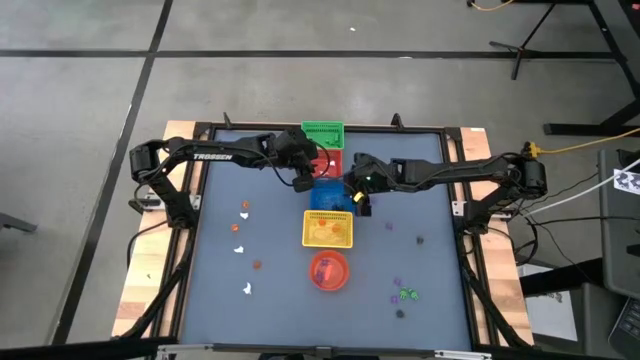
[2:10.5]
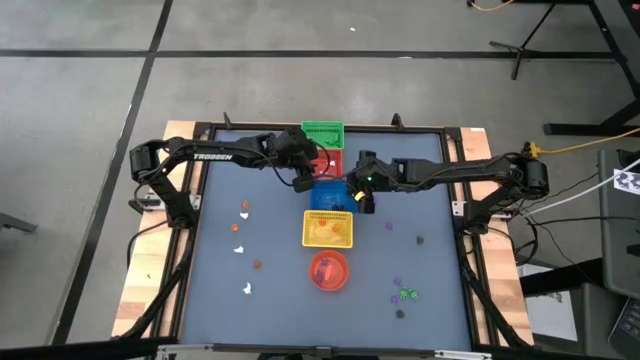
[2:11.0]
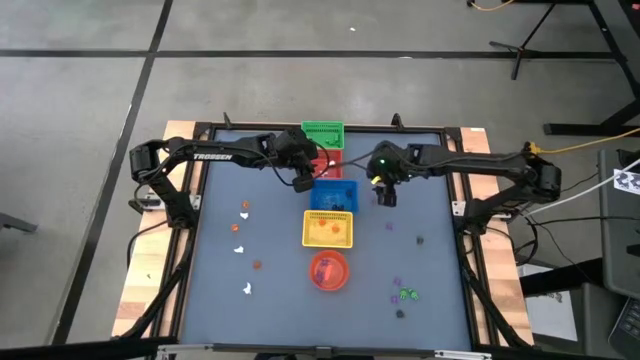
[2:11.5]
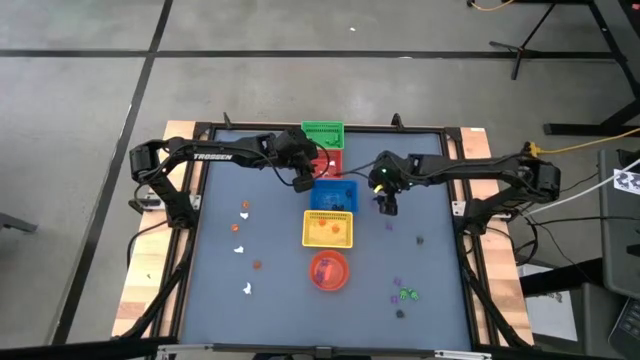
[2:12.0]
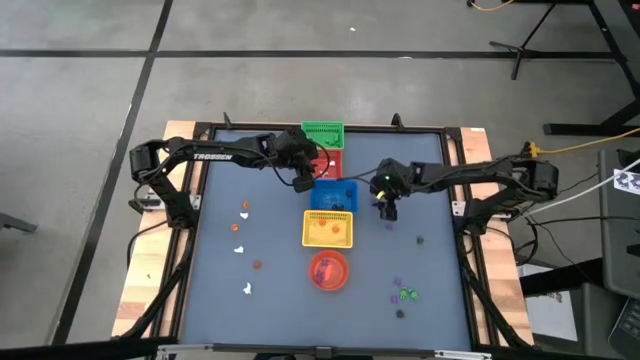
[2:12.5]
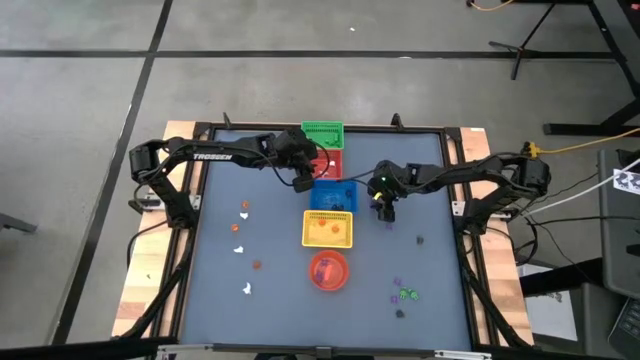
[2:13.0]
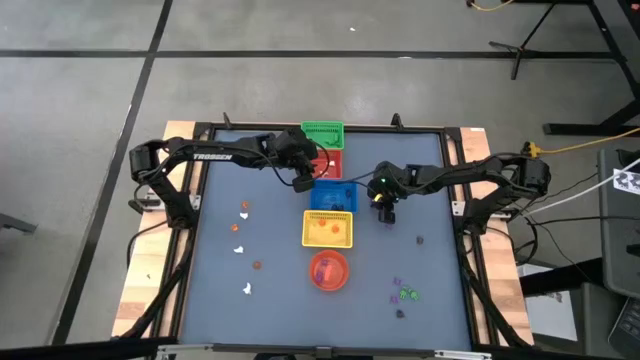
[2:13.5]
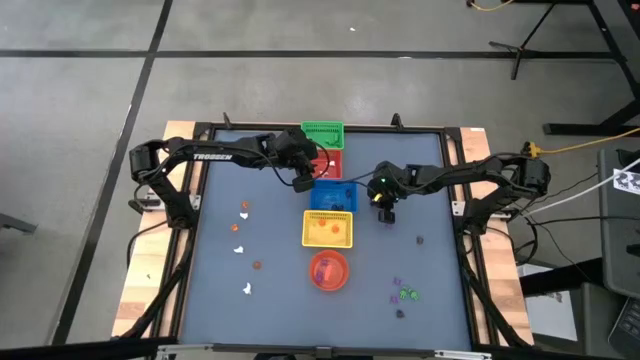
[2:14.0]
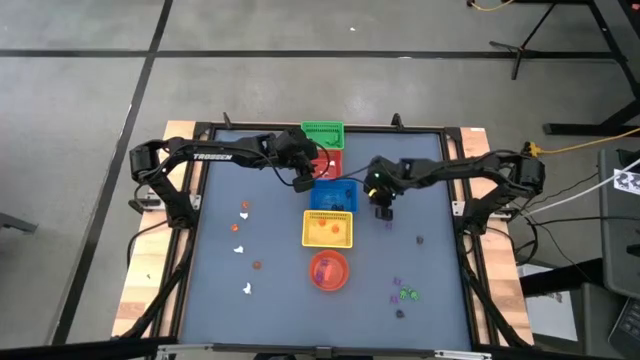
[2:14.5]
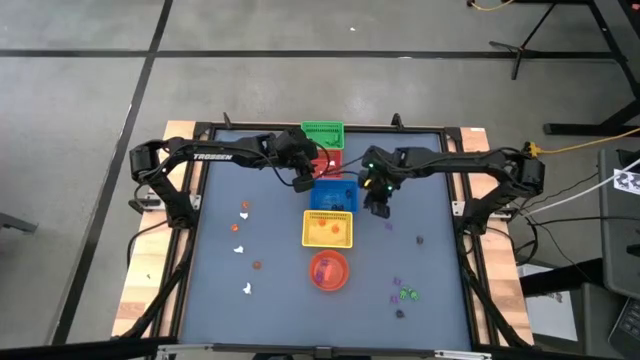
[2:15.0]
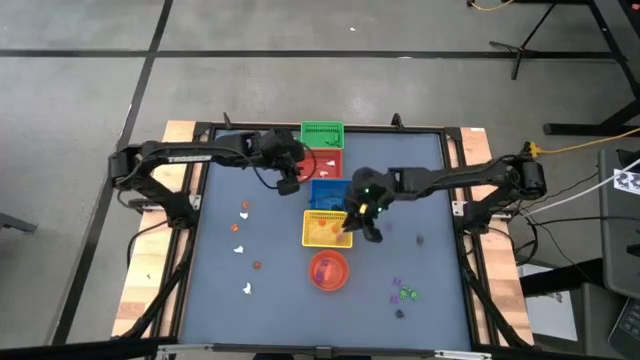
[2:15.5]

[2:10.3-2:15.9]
Task: Sort Halloween decoration
Put the purple spider toy into the orange bin

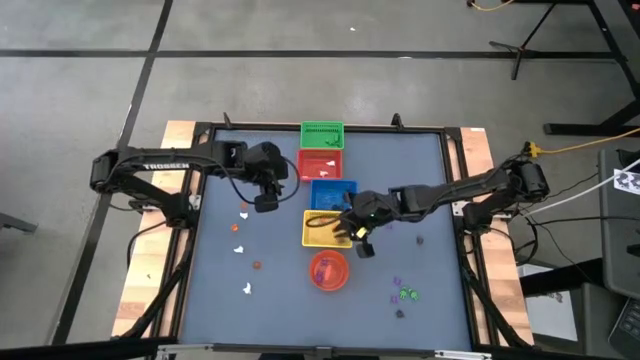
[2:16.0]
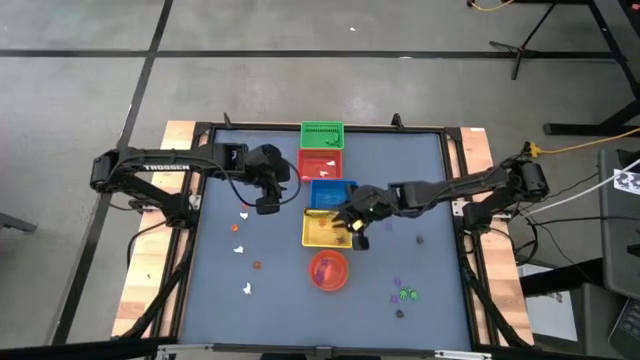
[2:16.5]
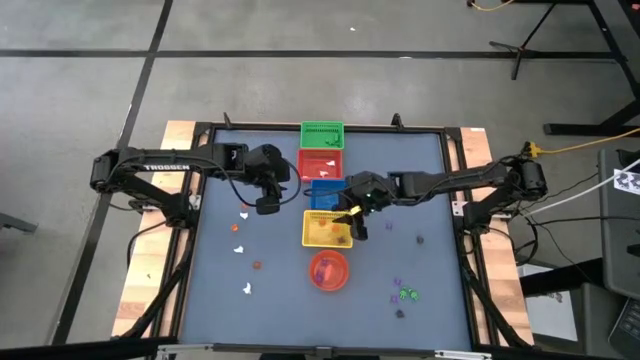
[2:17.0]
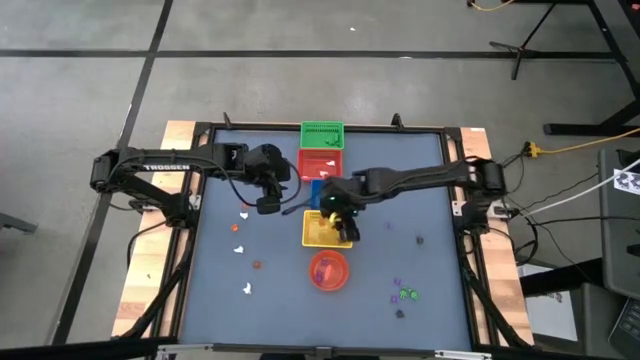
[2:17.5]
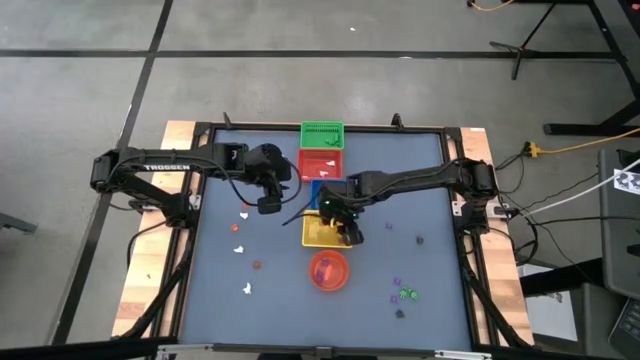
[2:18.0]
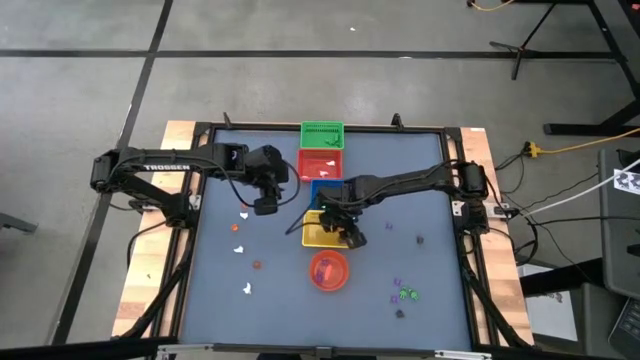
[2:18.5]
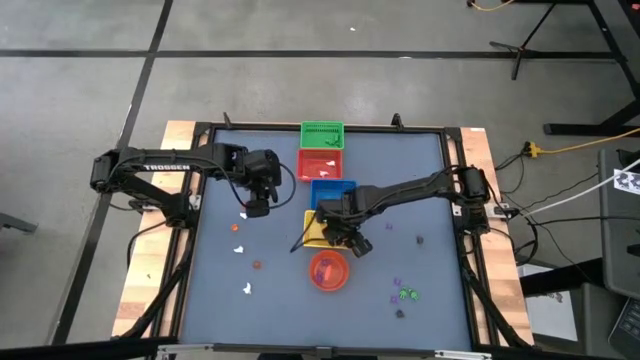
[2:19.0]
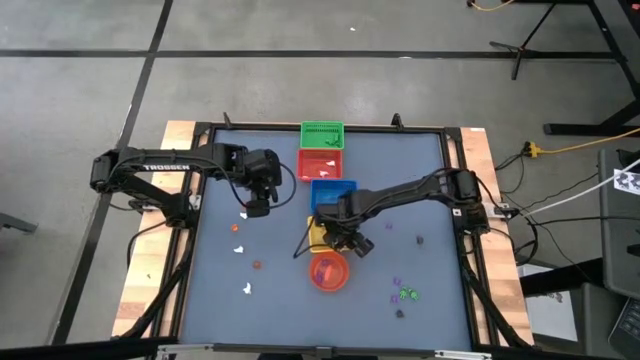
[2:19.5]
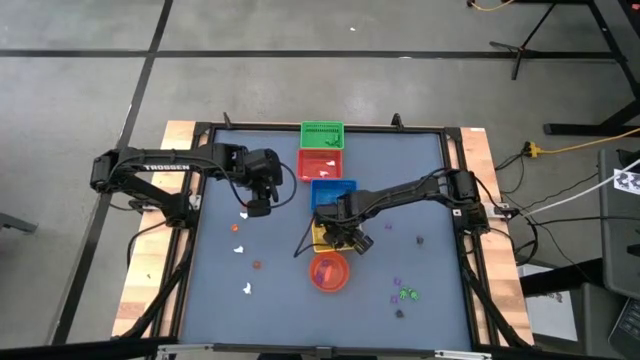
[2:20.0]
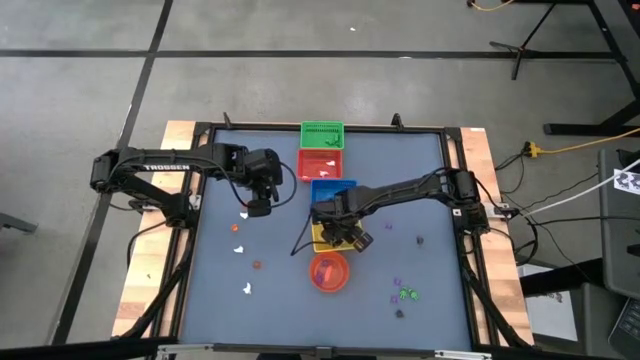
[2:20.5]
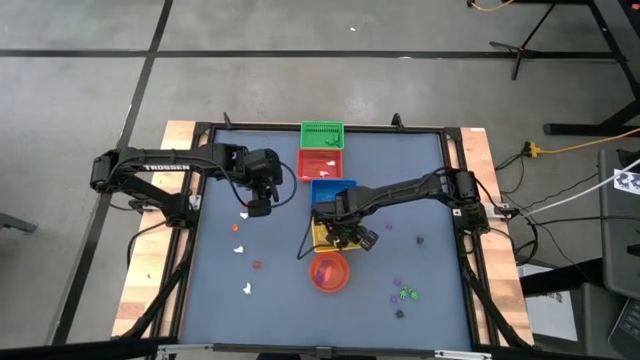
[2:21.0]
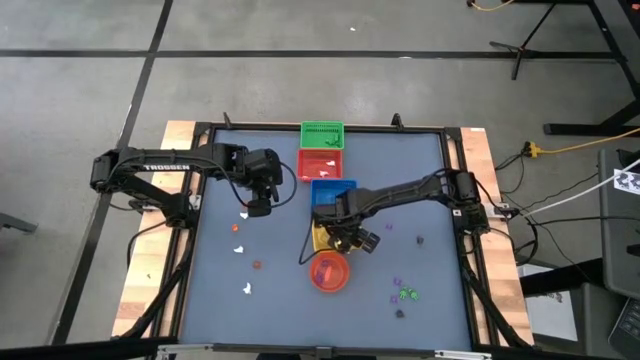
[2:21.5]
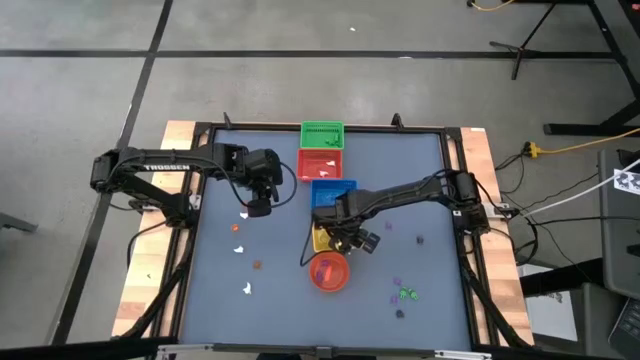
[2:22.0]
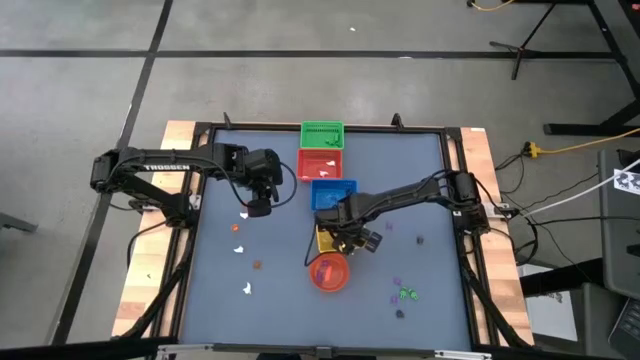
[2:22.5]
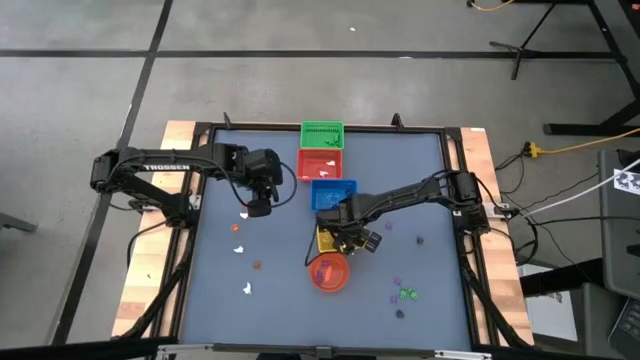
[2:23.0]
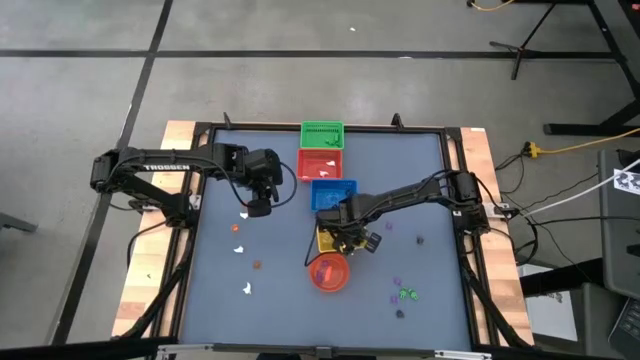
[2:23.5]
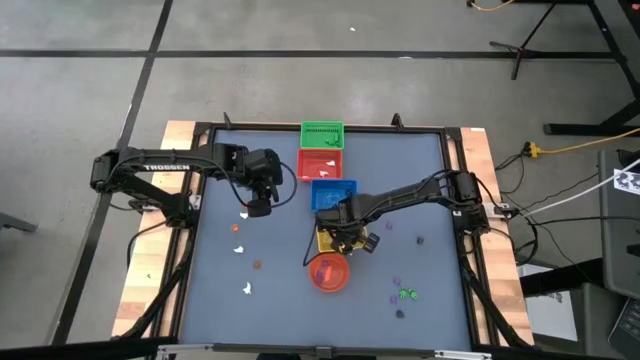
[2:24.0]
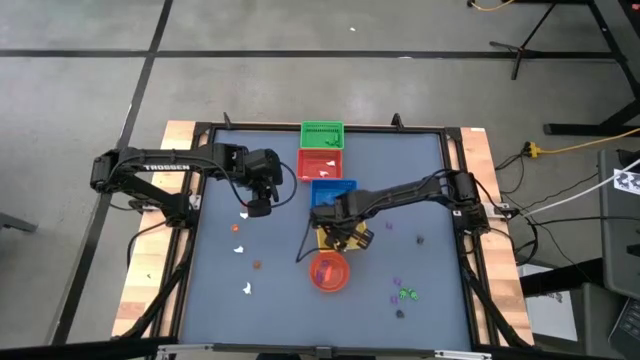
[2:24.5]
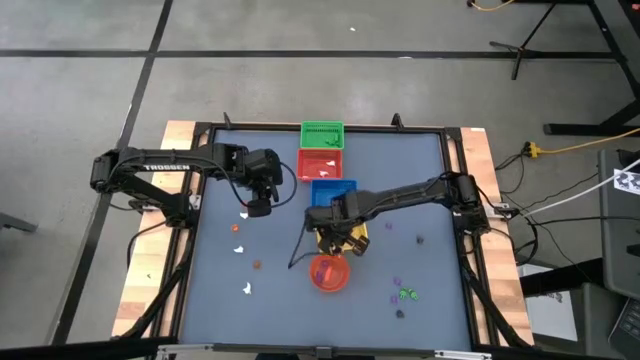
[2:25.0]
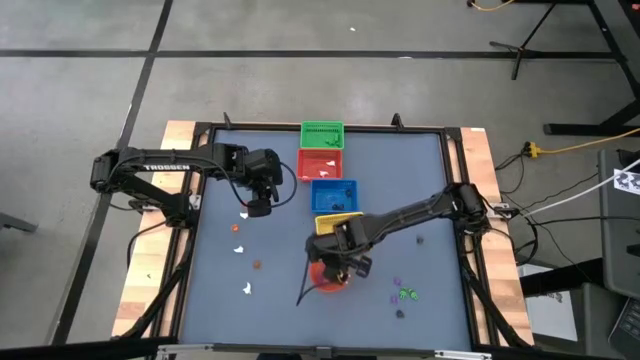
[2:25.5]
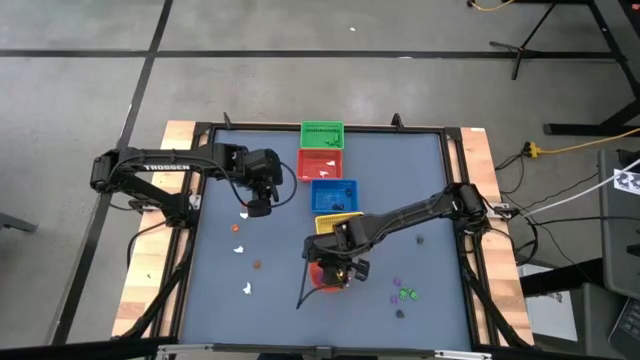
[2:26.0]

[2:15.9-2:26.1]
Put the purple spider toy into the orange bin

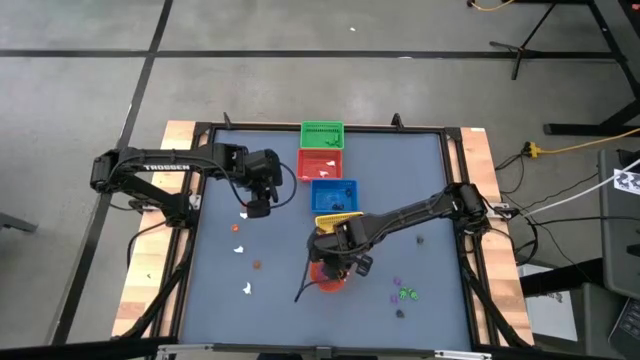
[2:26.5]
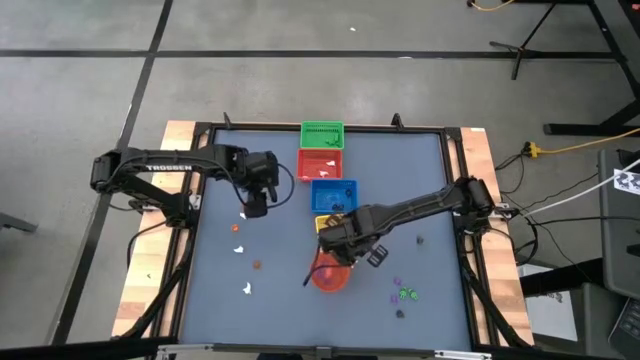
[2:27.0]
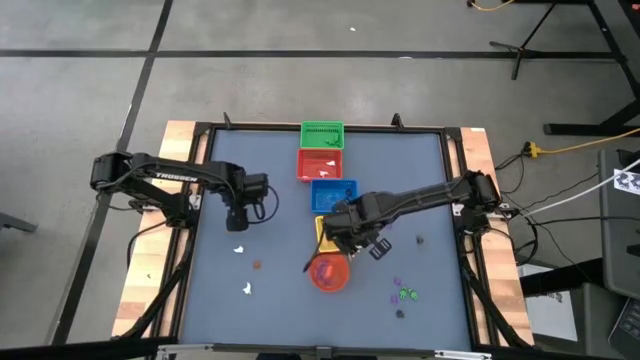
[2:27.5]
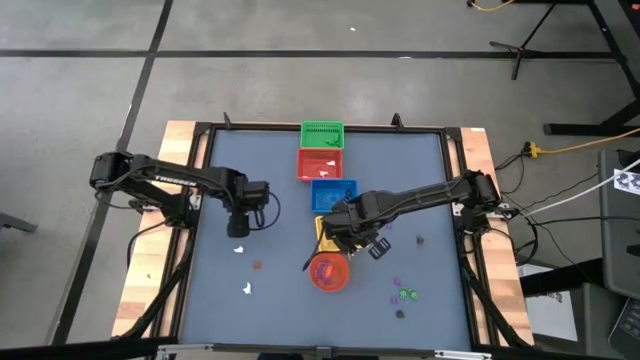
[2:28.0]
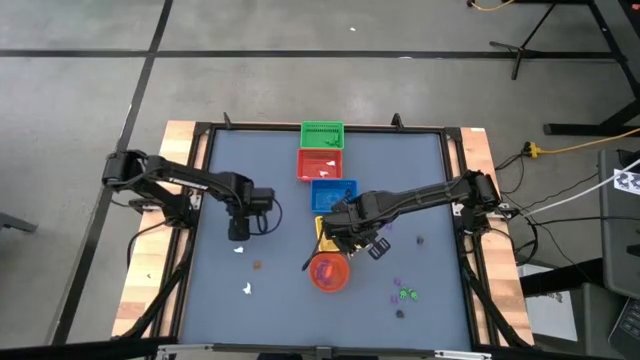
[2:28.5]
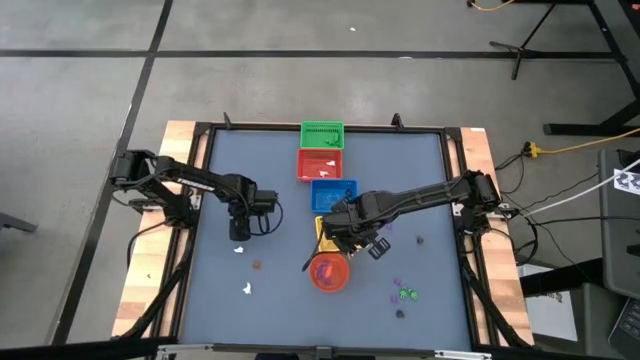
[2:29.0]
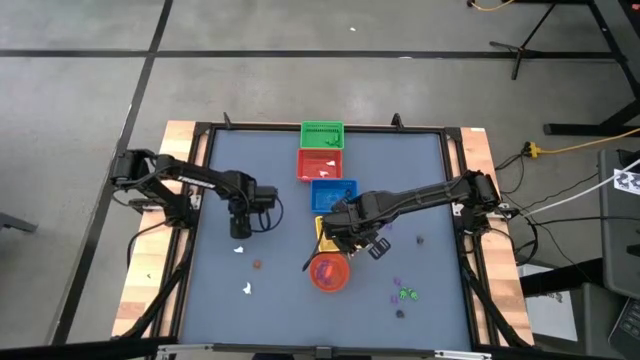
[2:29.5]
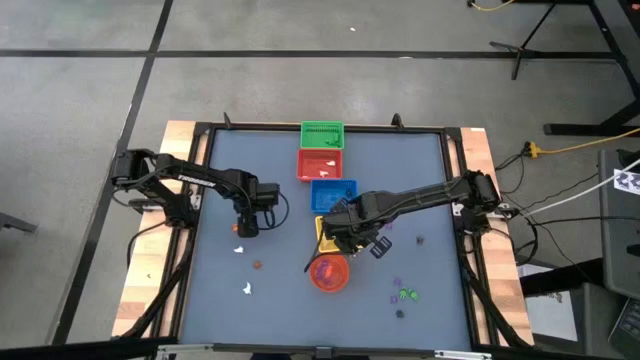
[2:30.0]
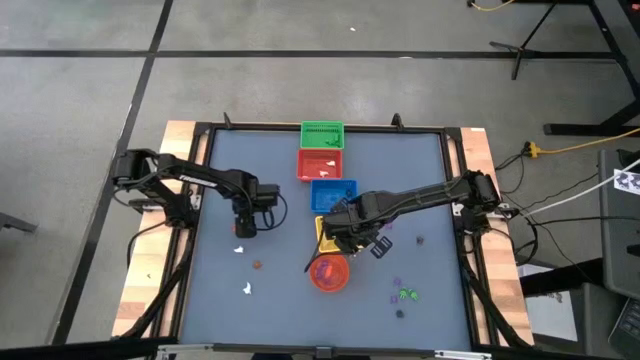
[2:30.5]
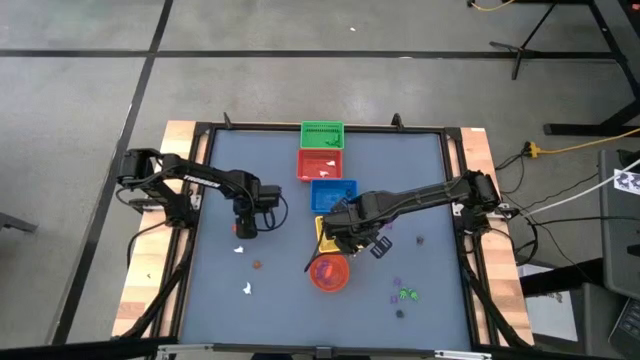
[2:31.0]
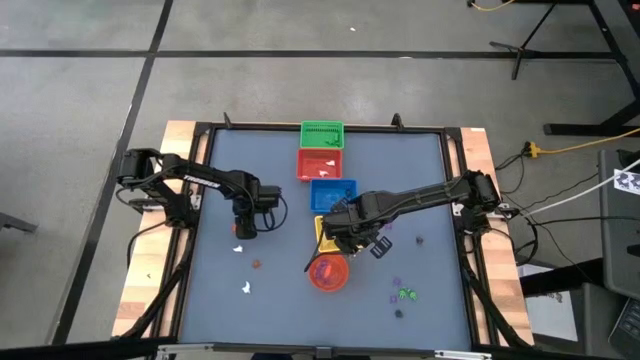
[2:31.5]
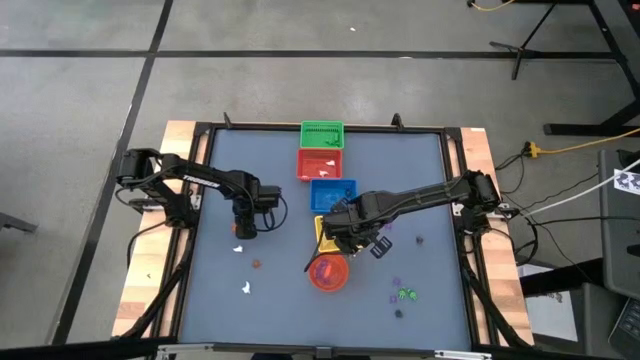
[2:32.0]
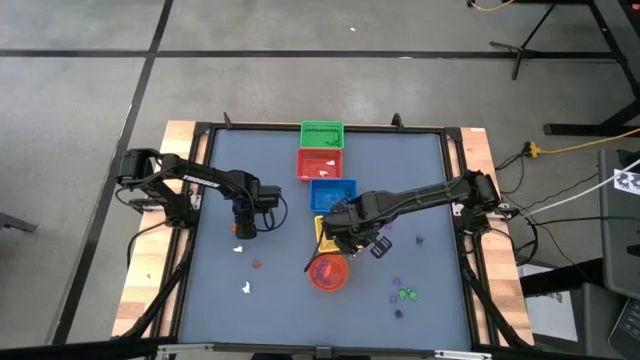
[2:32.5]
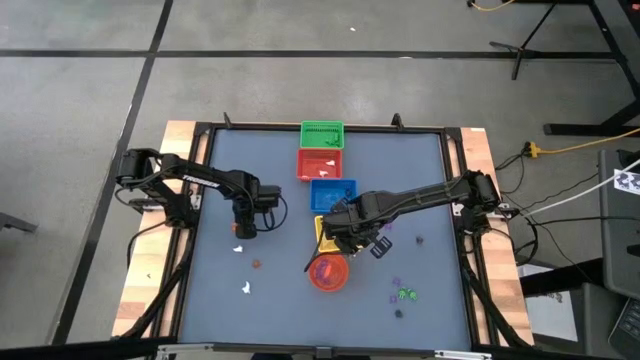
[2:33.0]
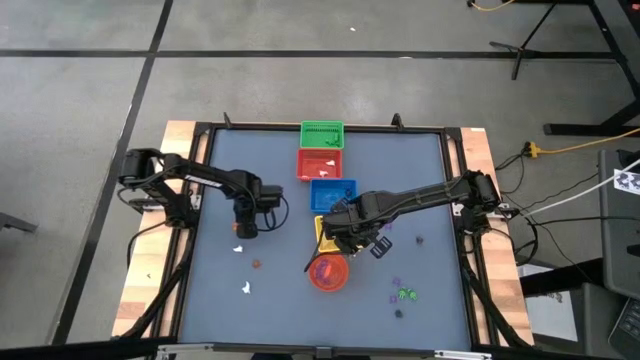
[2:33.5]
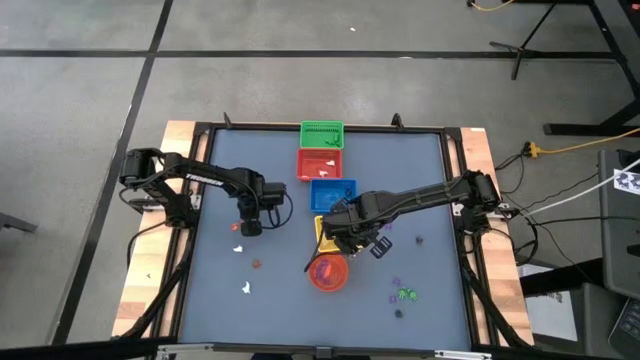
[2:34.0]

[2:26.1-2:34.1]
Put the white ghost toy into the red bin
